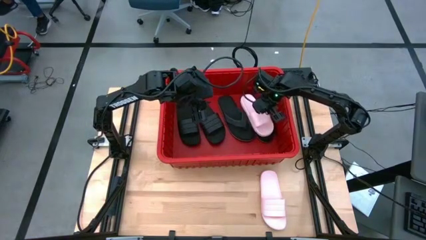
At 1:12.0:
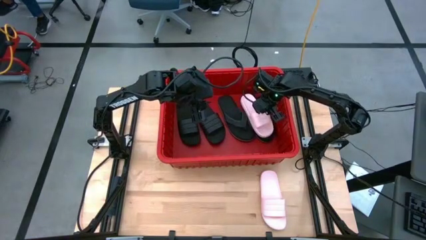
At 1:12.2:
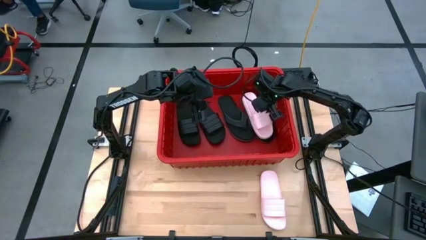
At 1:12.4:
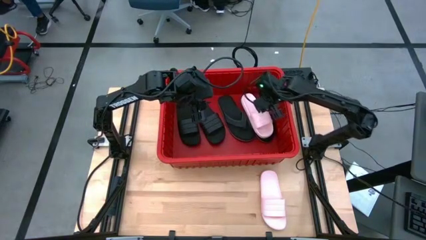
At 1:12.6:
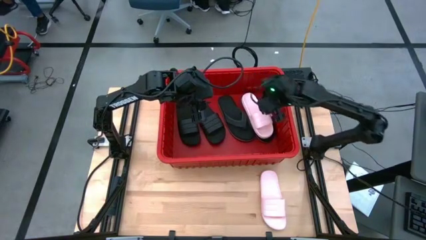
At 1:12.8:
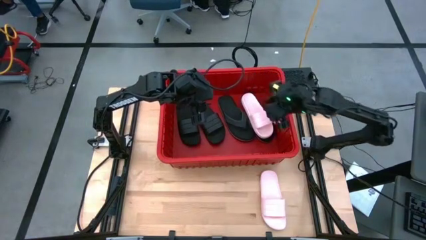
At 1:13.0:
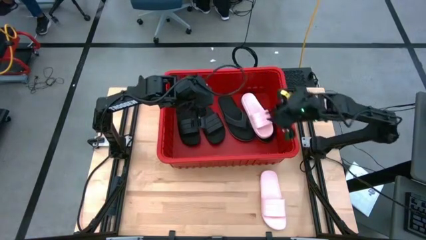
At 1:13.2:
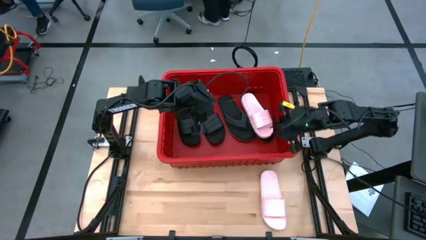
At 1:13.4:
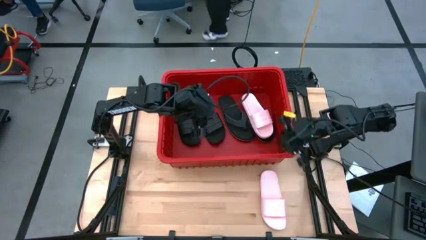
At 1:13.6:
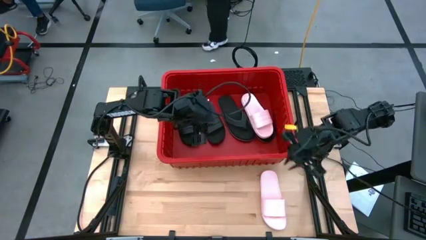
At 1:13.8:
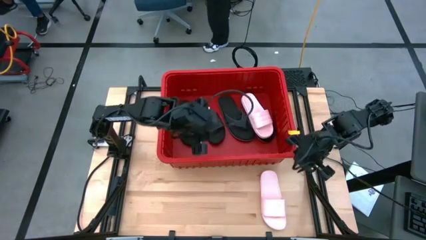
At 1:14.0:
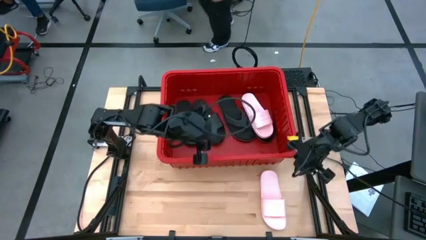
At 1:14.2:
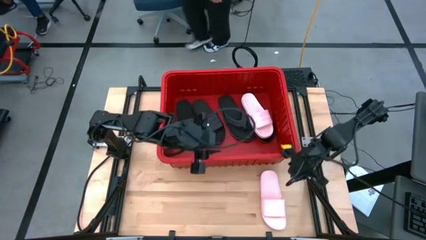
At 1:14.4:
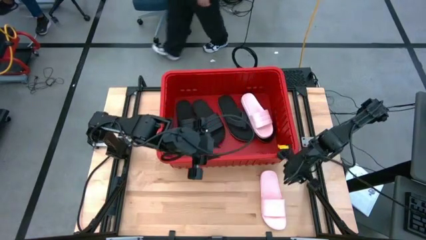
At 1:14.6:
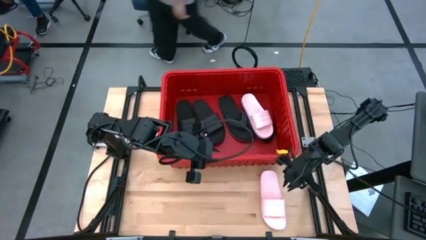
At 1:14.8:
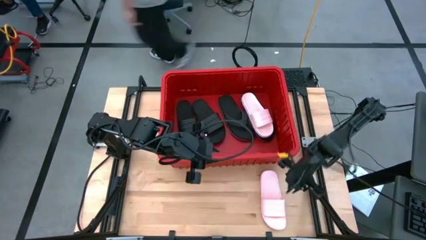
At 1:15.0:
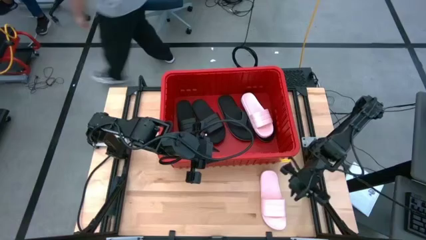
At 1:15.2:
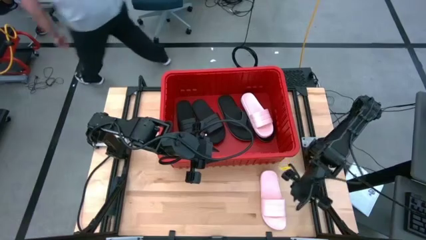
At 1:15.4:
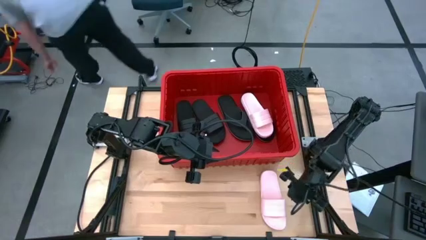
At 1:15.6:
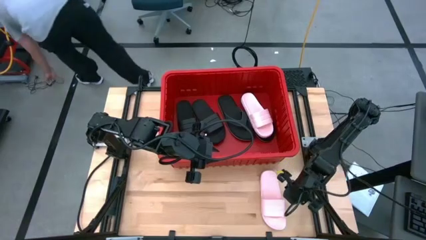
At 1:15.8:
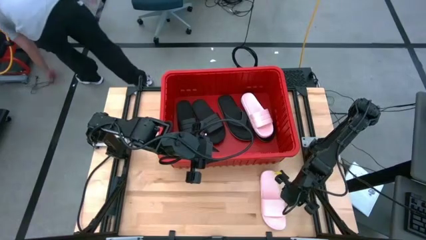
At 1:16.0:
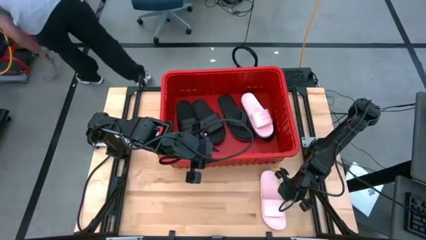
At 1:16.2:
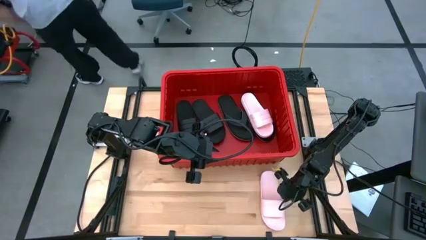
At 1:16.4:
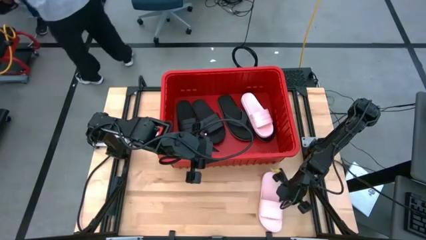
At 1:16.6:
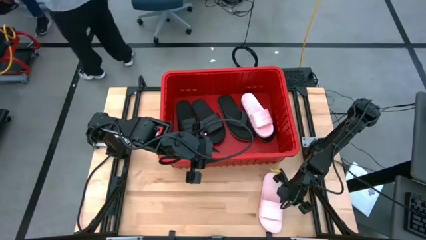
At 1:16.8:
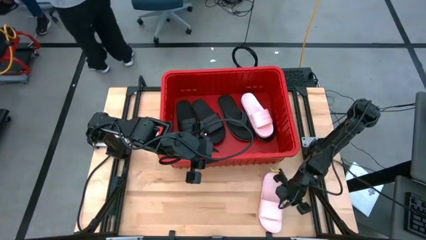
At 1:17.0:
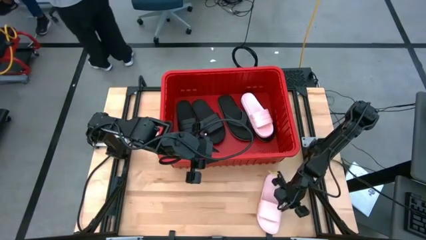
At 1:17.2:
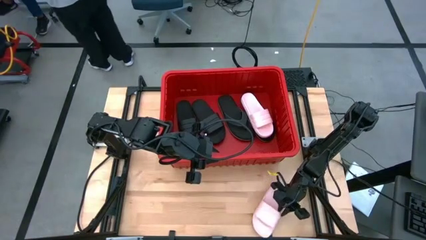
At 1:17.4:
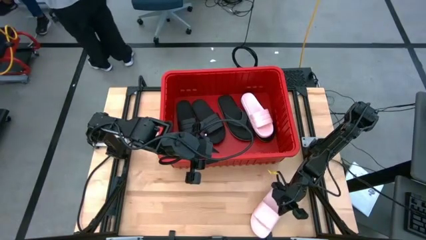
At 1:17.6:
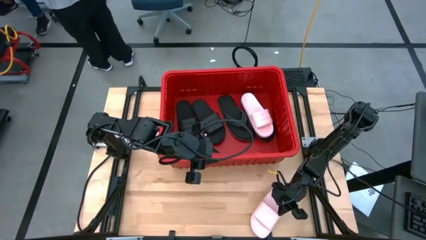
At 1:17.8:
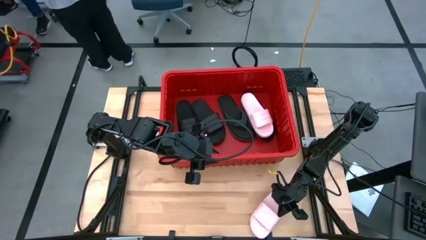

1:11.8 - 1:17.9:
Task: Pick and place slides into bin
Put the pink slide into the red container

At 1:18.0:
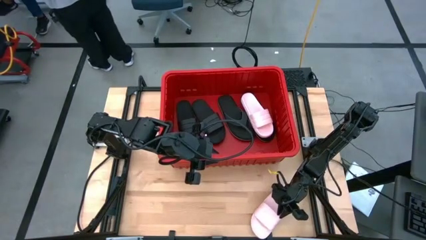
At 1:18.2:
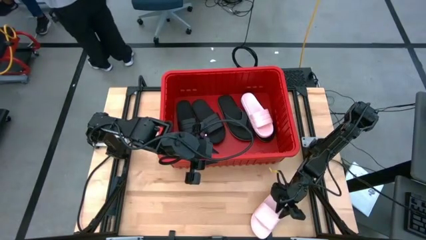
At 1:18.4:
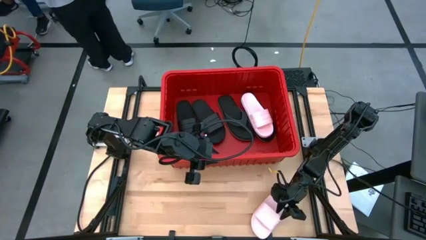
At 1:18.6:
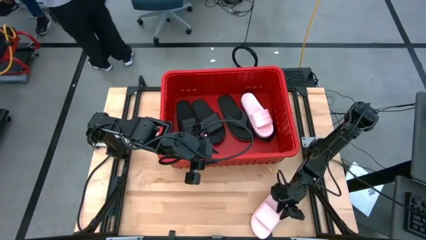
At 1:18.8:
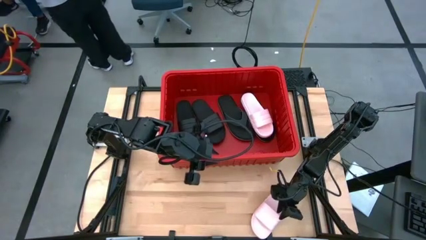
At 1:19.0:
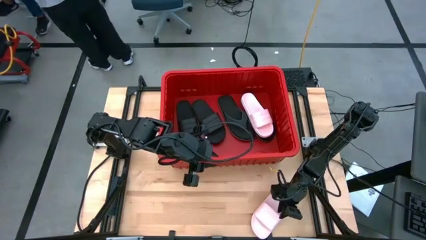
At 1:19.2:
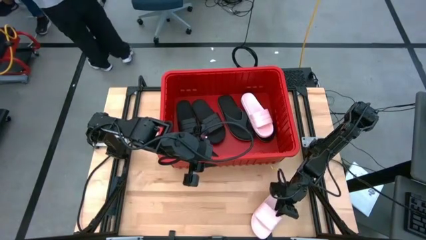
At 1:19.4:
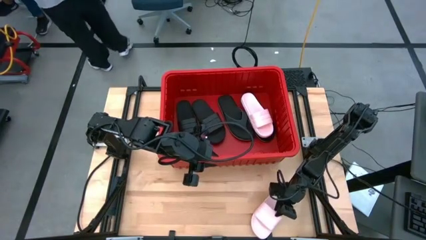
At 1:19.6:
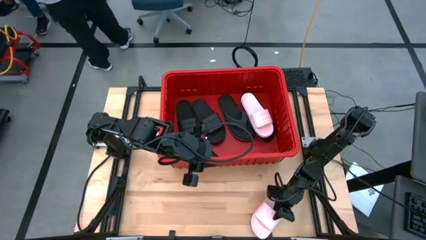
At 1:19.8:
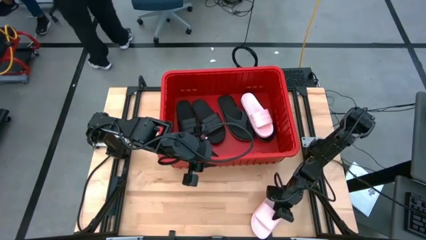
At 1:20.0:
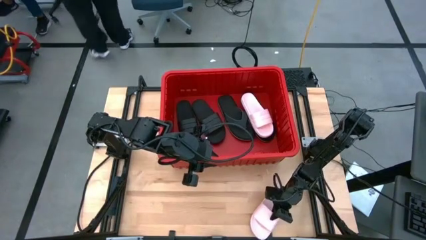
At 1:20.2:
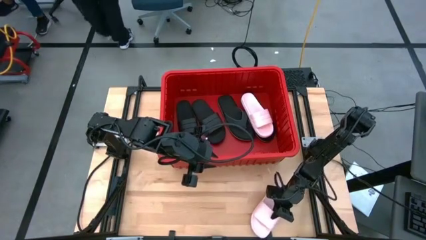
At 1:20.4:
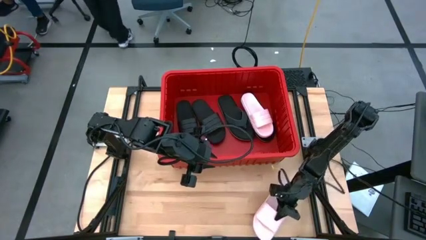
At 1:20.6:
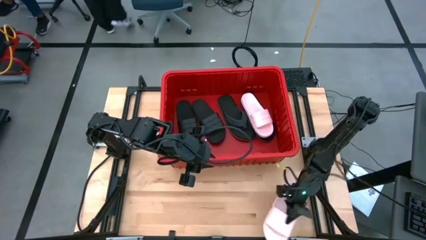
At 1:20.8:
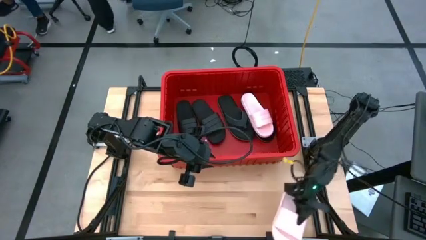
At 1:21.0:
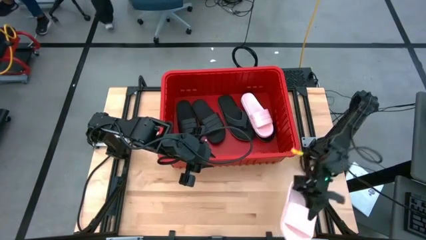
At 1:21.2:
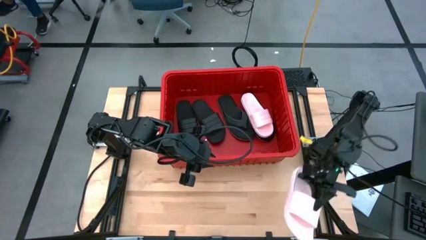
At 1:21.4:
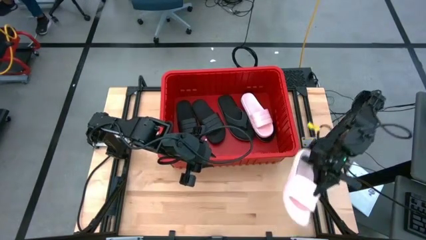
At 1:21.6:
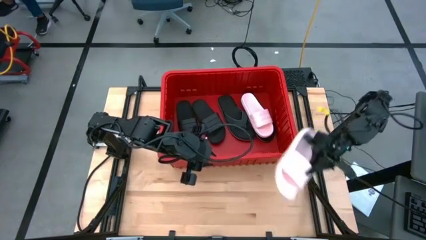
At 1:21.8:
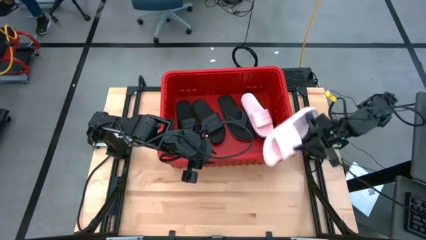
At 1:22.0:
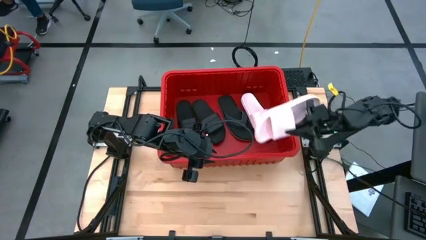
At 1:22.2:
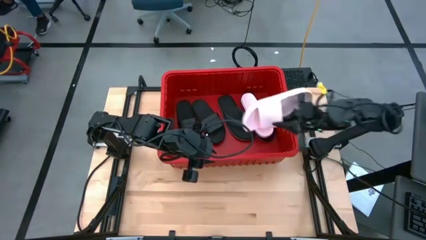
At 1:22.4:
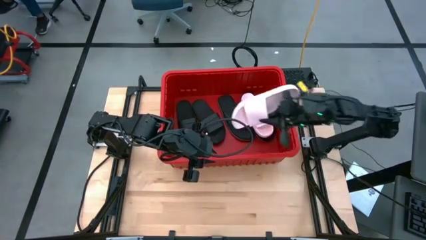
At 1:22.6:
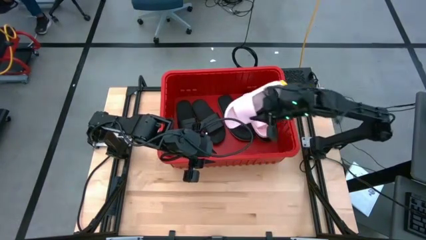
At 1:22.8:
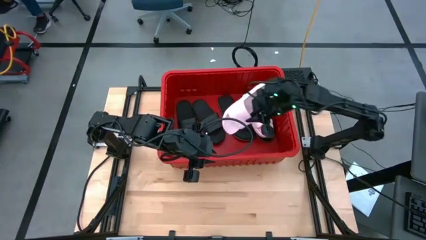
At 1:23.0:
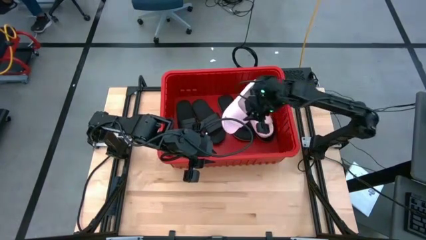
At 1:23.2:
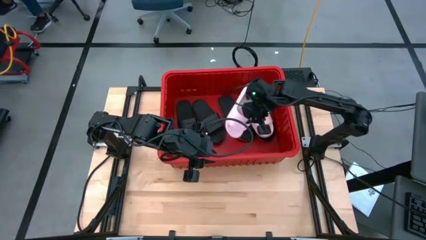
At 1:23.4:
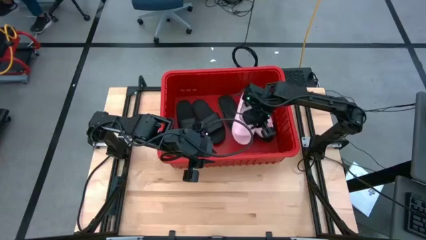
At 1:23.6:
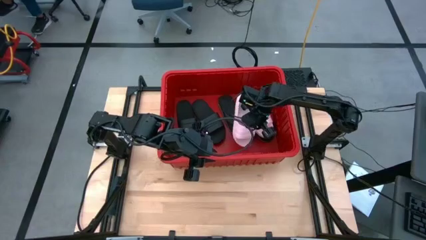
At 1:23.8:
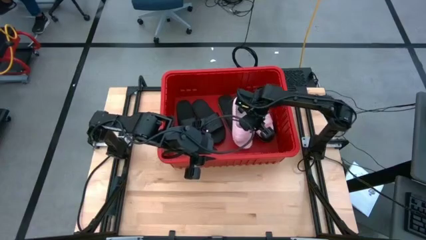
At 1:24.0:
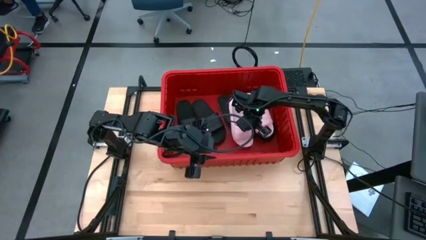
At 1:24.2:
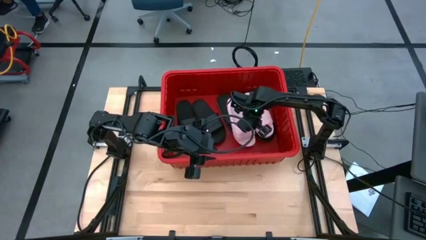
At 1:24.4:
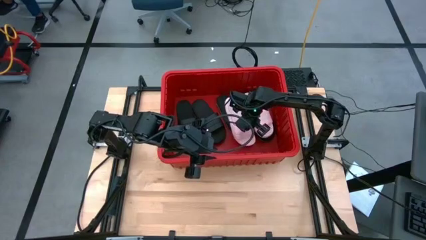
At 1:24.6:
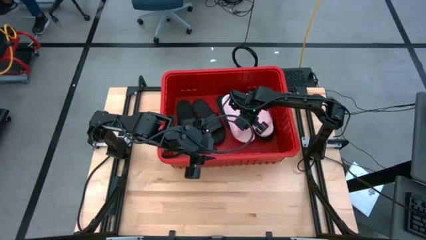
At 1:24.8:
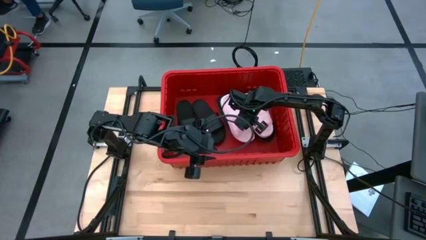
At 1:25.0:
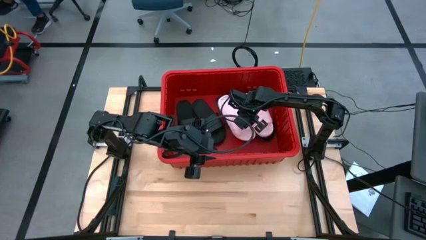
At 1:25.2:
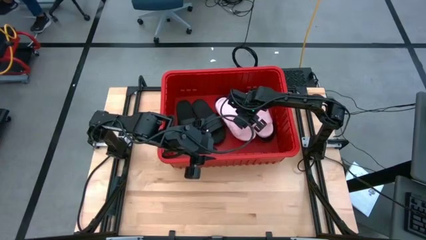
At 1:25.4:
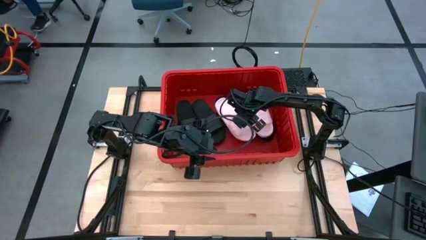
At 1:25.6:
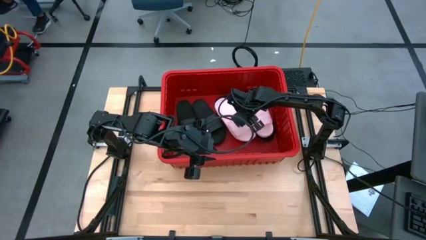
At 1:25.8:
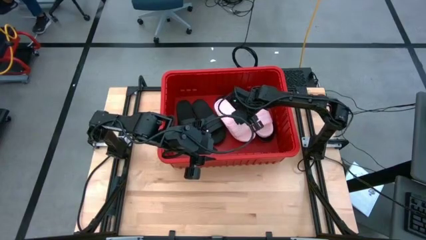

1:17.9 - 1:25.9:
Put the pink slide into the red container

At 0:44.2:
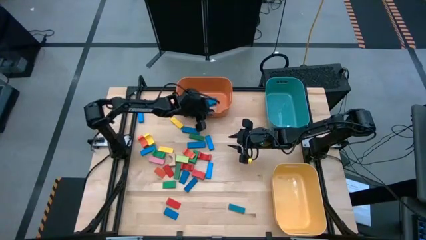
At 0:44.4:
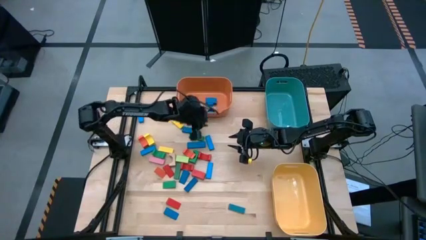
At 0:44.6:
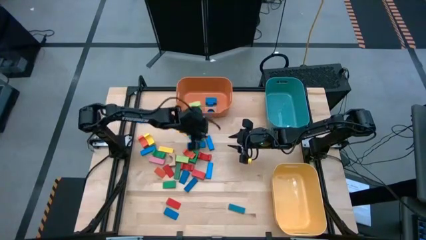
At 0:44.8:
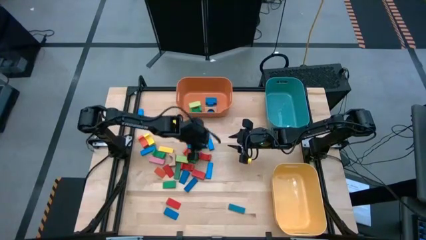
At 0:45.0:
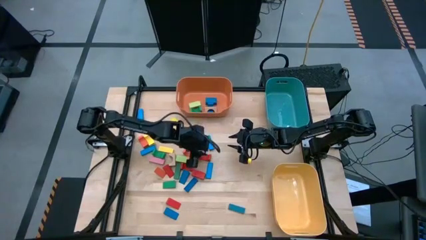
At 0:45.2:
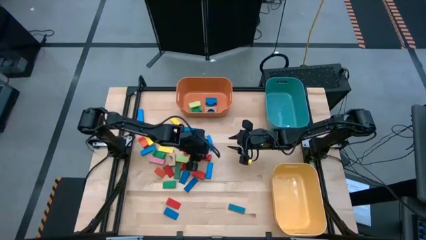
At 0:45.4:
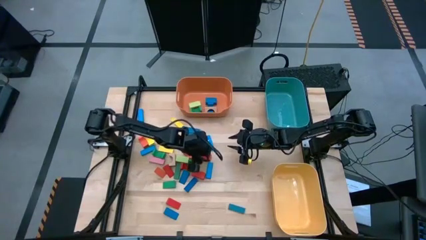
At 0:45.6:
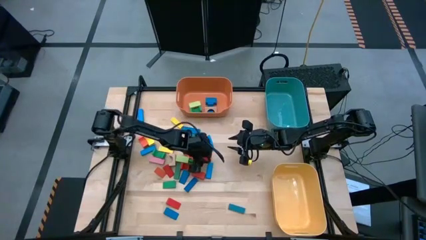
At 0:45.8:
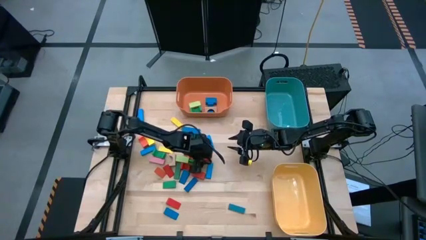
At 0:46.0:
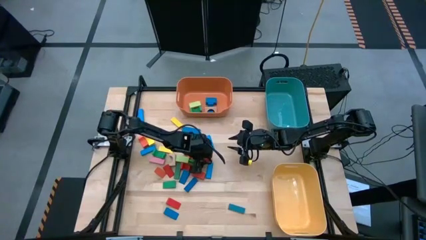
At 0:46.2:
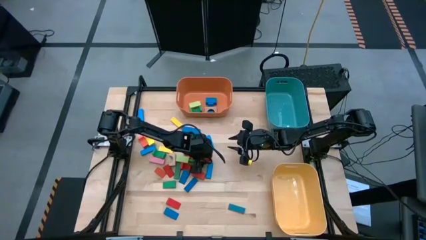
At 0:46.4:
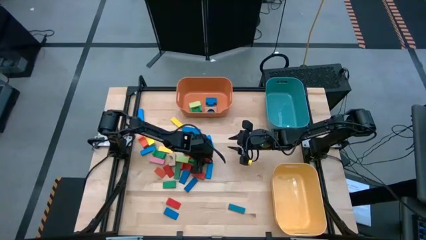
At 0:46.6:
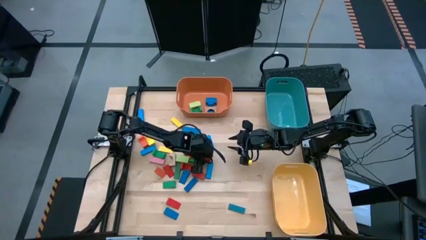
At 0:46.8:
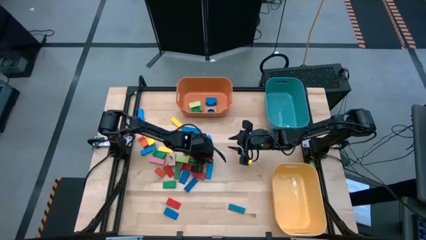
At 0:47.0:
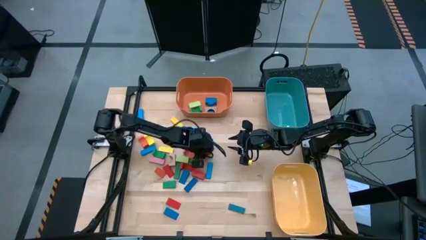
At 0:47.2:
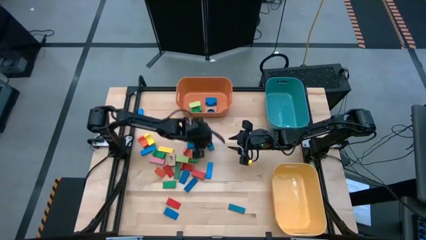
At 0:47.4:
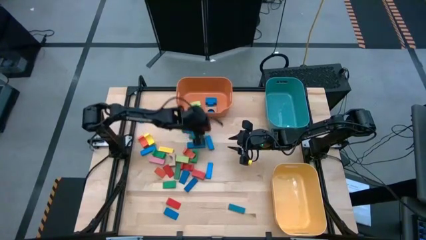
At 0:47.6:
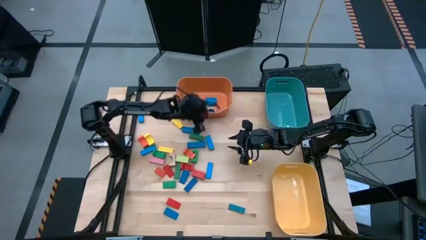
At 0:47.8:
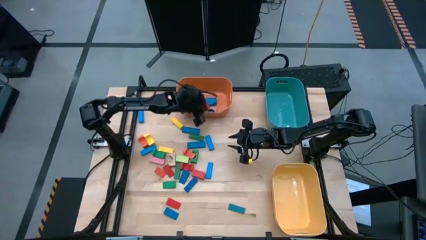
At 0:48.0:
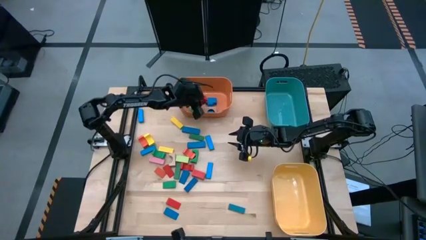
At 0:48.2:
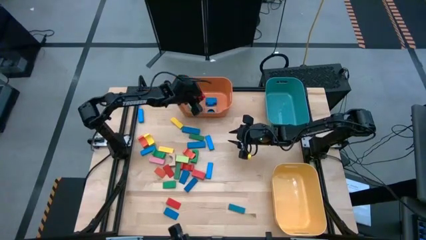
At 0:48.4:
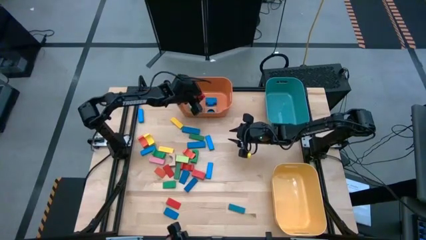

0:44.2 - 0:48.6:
Task: Sort blocks by size
Put the red arch block into the orange bin
